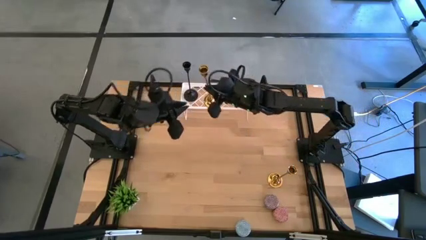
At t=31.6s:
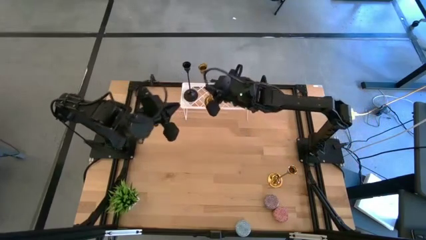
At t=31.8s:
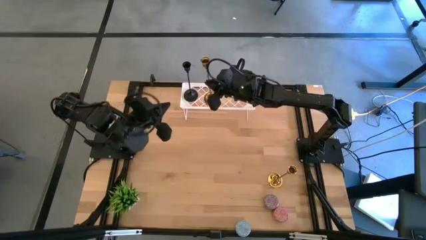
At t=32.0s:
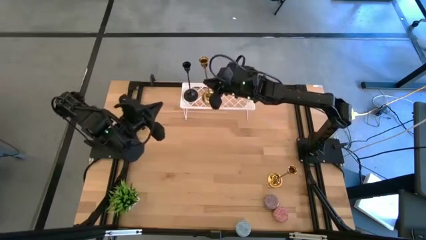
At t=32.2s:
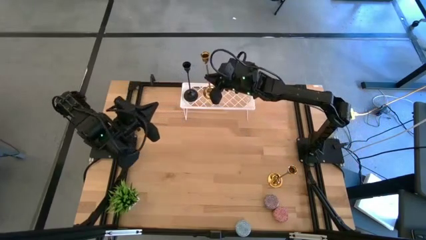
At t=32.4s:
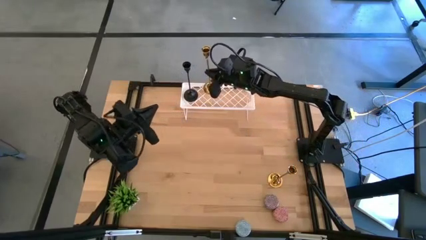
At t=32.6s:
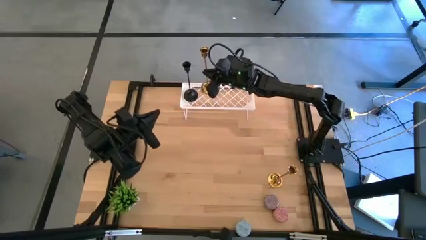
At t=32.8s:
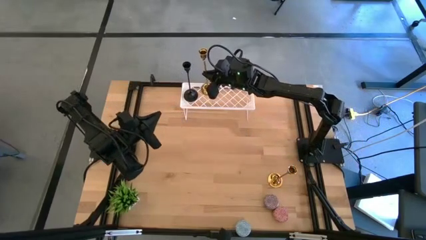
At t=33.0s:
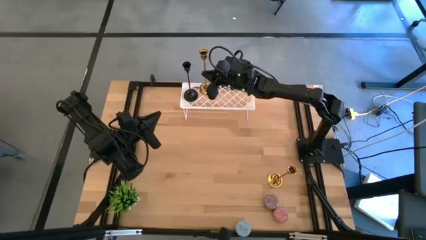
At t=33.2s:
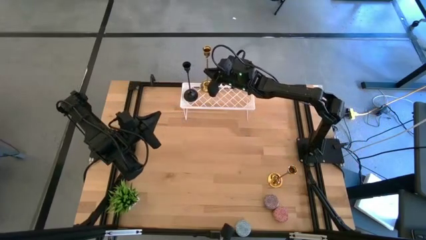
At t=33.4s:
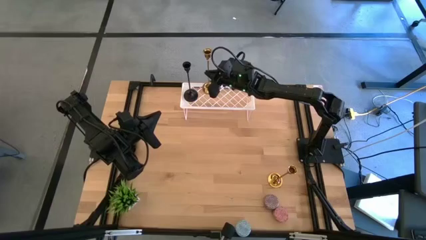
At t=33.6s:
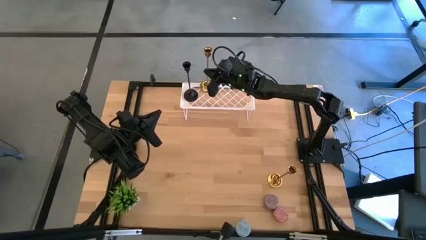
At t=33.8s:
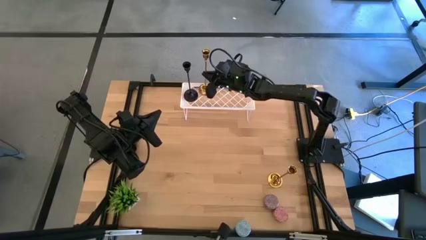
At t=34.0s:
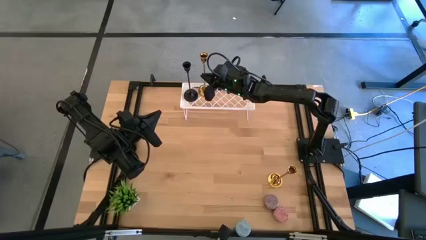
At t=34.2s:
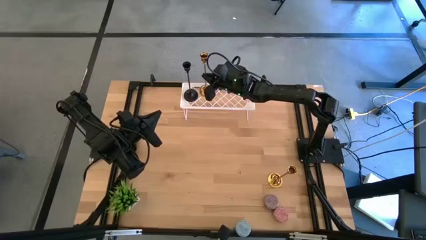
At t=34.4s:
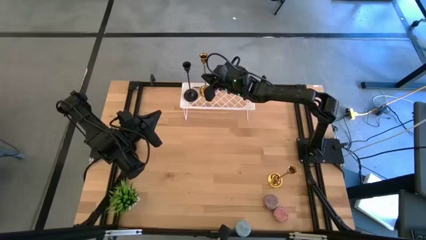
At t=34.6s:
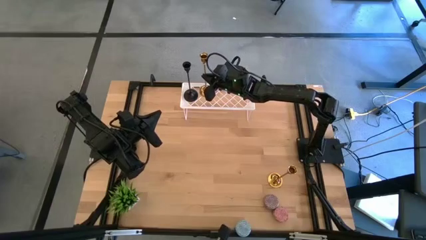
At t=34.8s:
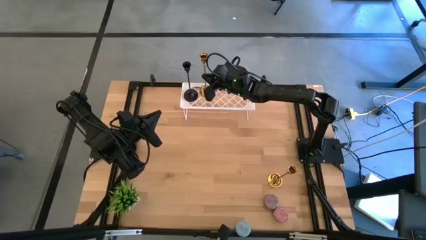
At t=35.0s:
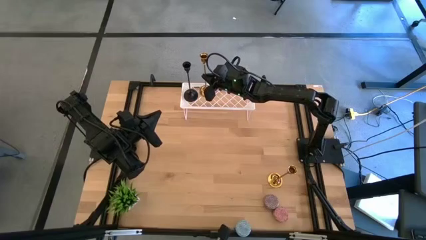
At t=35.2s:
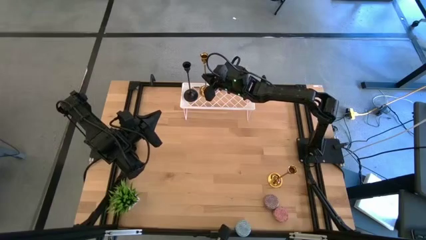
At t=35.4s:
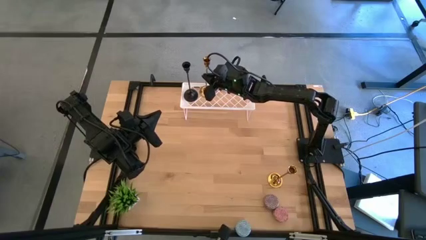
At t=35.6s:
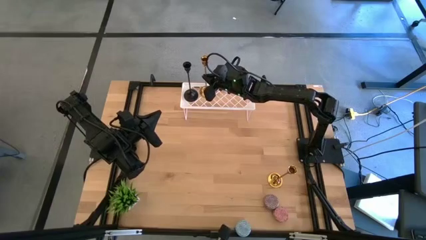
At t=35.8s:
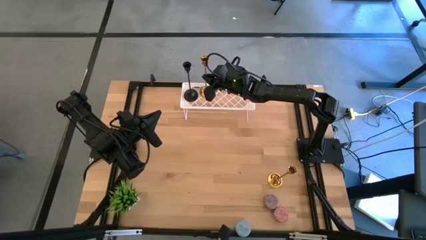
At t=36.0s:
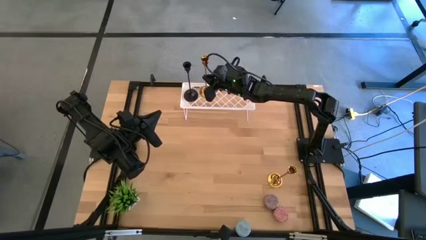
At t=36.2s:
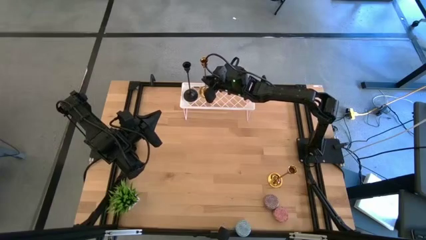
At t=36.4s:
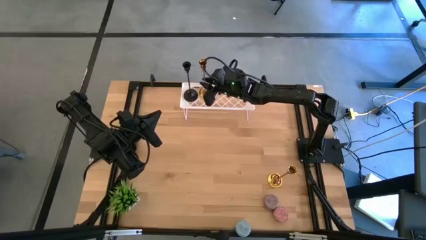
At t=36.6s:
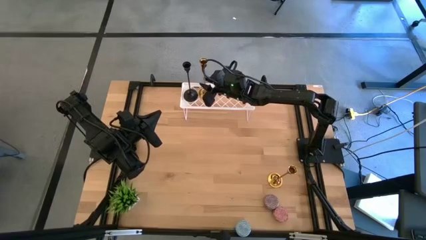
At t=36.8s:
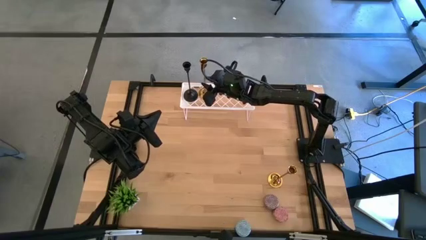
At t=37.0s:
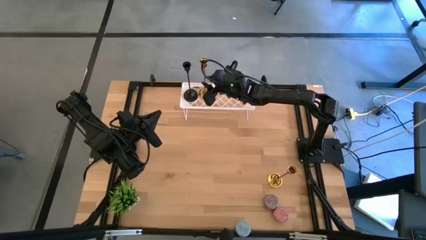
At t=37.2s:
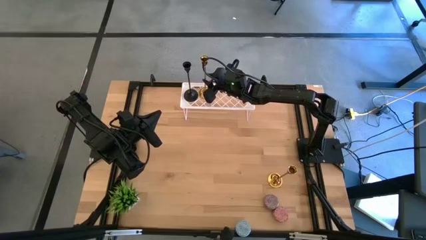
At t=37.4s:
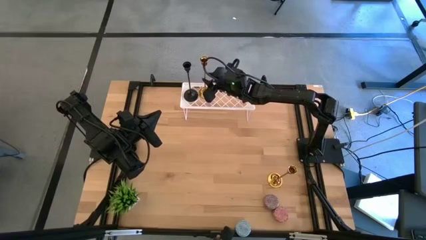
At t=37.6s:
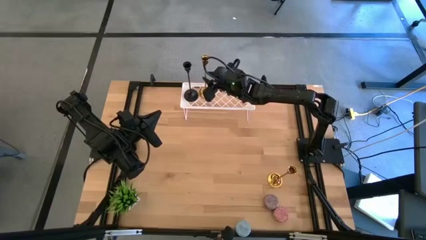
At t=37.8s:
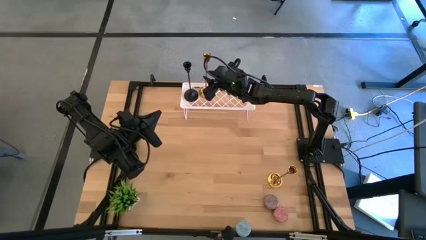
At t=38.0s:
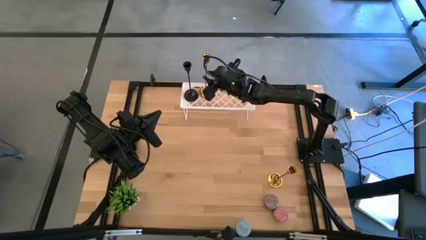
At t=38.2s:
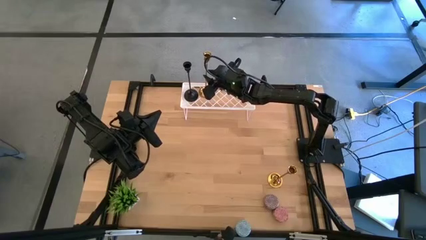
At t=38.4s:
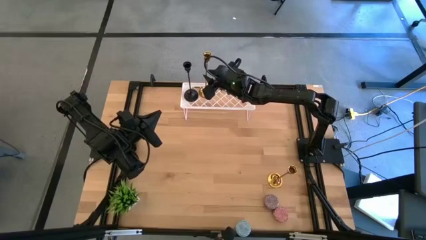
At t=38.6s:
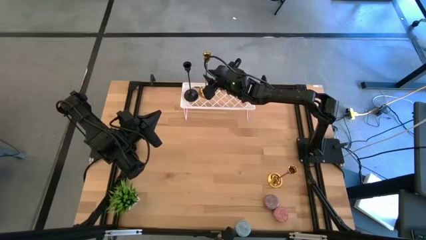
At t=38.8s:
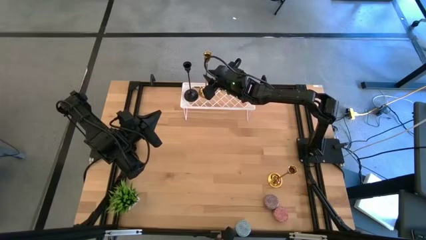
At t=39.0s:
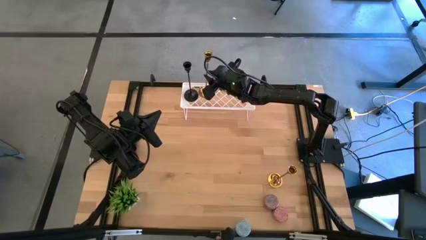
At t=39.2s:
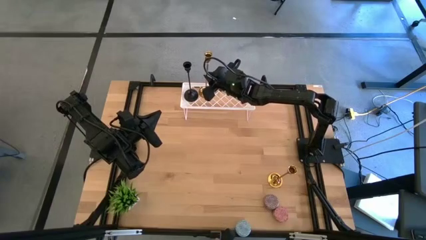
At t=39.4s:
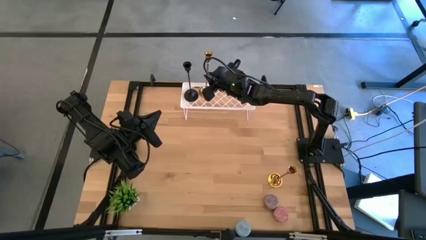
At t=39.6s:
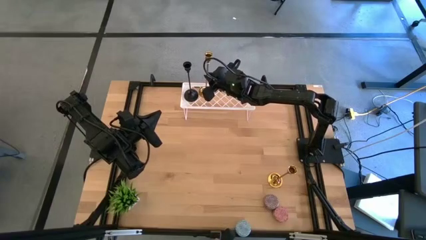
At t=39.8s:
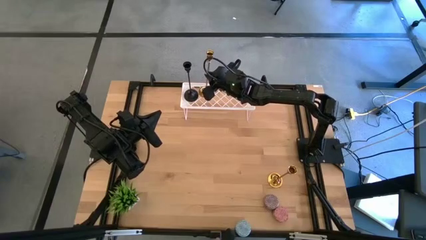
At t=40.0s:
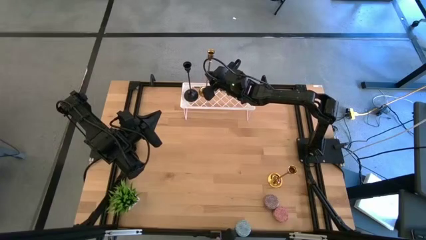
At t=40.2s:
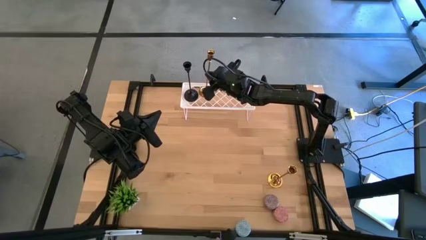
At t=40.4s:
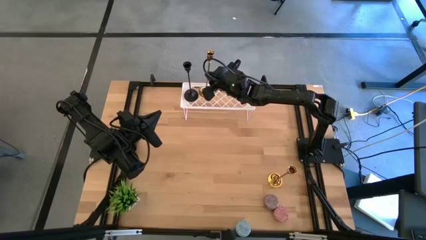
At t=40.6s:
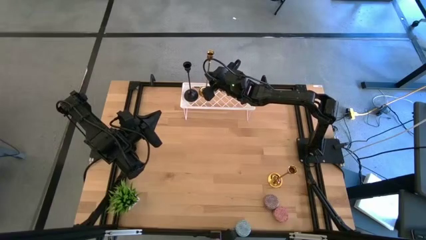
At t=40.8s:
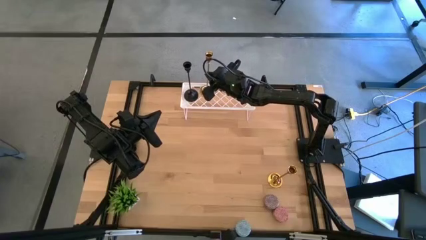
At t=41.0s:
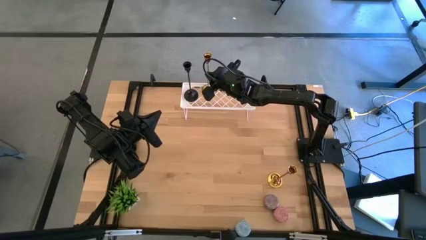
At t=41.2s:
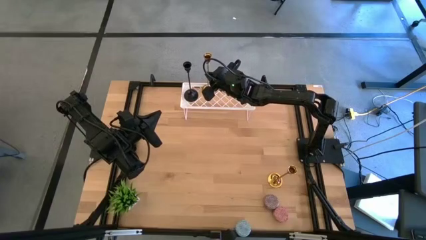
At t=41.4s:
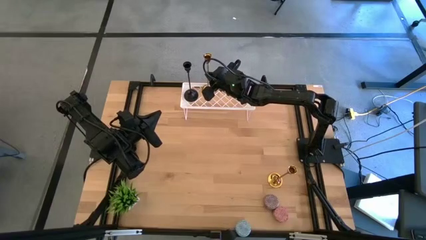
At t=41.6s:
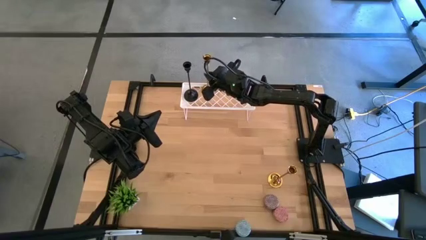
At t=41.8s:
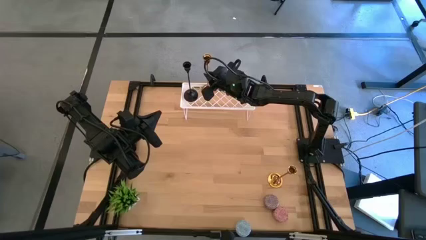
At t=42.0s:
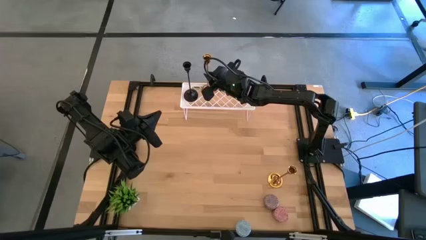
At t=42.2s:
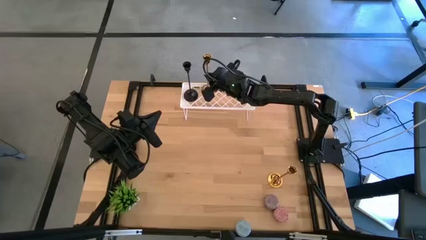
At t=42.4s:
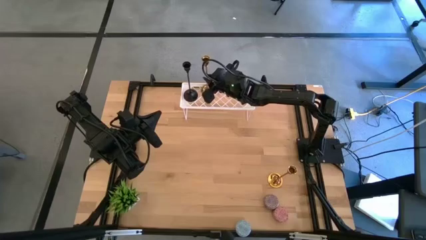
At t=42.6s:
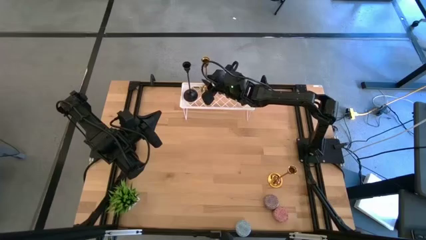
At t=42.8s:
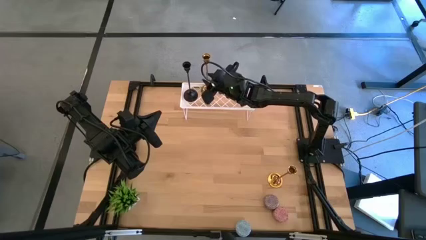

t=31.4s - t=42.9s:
Task: Pick & Place candle stick holders
Put the left gold candle holder on the shelf
